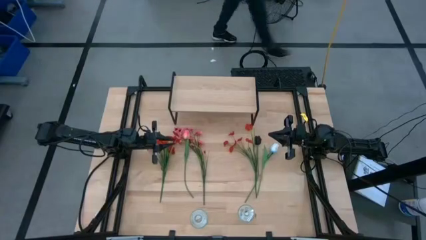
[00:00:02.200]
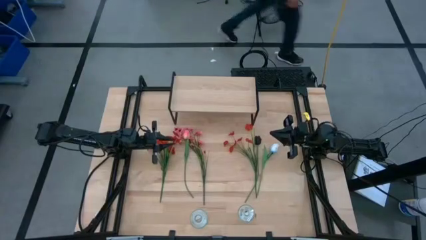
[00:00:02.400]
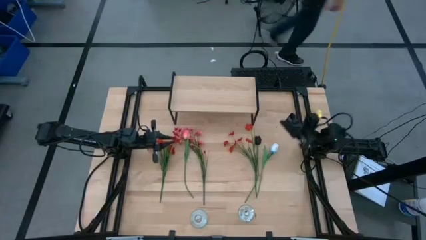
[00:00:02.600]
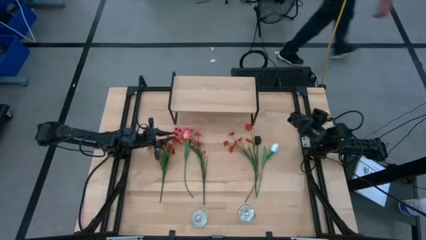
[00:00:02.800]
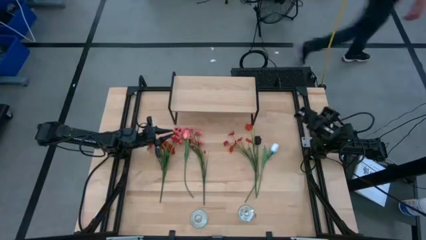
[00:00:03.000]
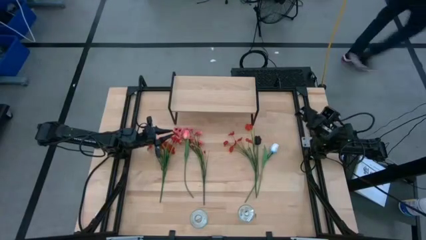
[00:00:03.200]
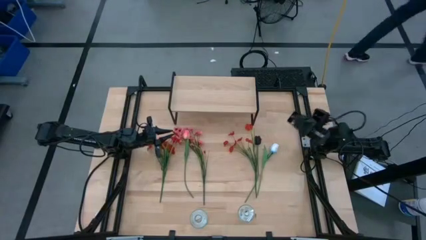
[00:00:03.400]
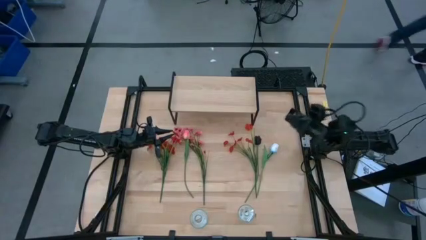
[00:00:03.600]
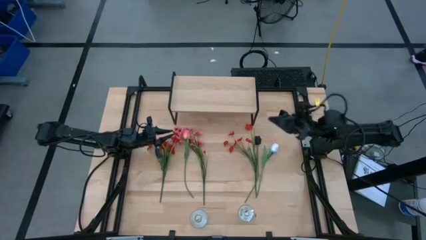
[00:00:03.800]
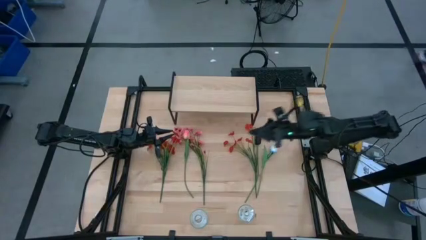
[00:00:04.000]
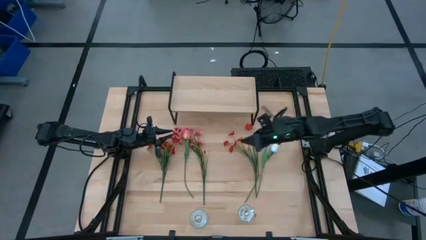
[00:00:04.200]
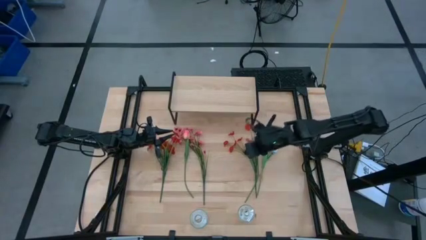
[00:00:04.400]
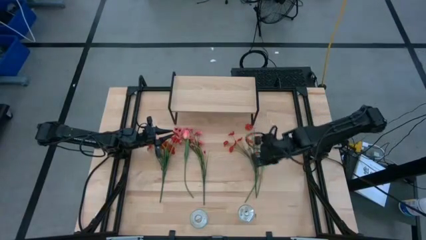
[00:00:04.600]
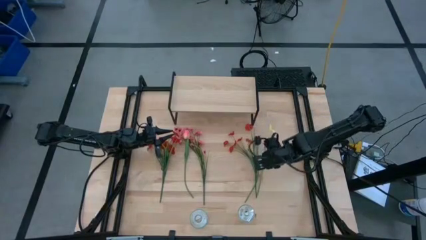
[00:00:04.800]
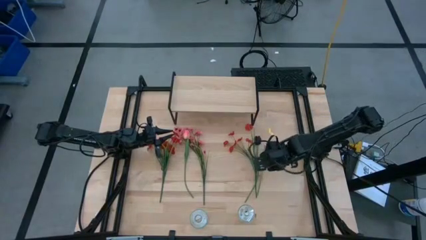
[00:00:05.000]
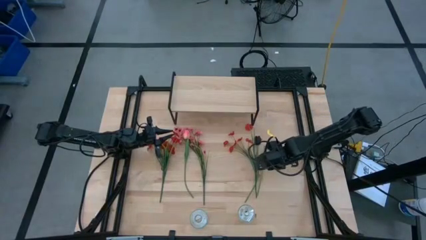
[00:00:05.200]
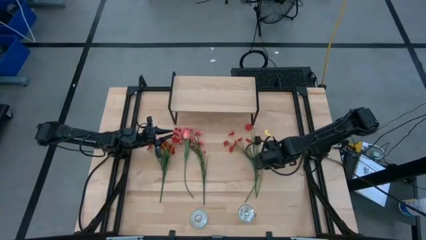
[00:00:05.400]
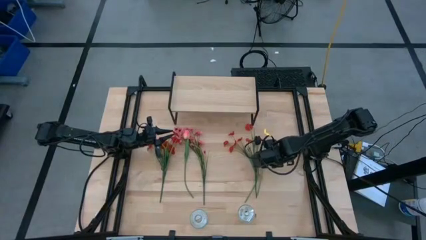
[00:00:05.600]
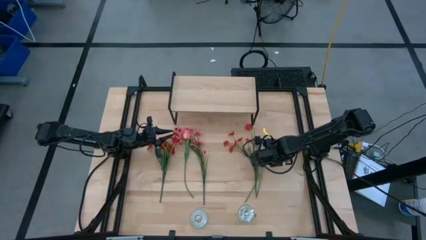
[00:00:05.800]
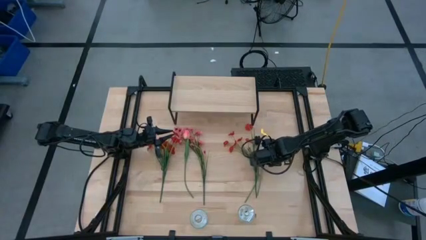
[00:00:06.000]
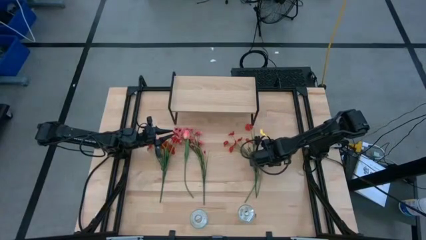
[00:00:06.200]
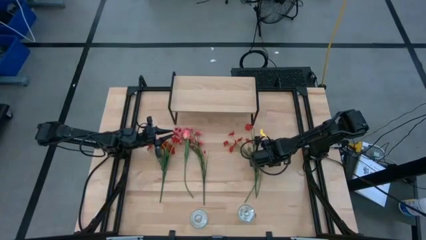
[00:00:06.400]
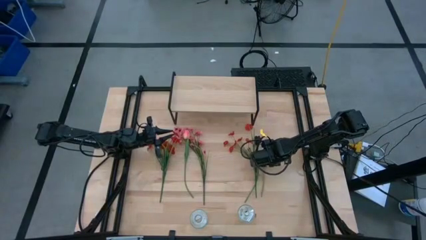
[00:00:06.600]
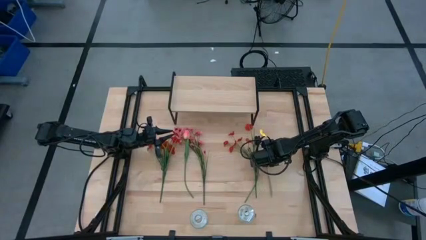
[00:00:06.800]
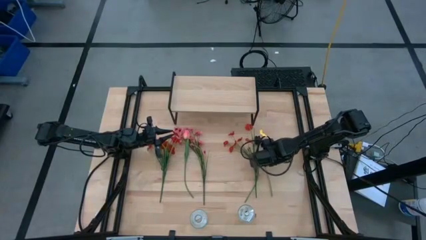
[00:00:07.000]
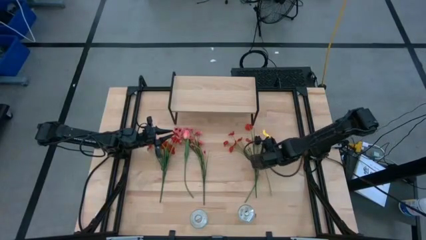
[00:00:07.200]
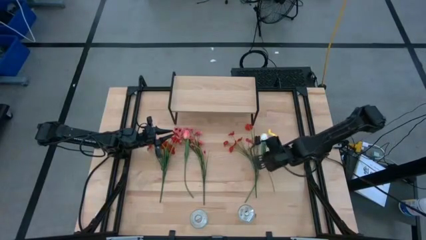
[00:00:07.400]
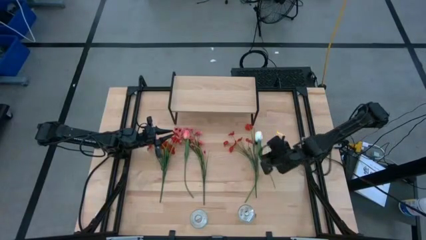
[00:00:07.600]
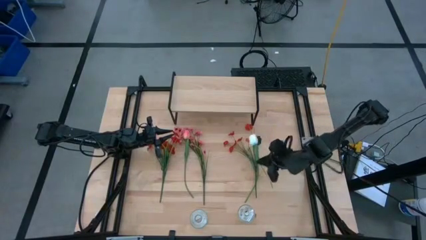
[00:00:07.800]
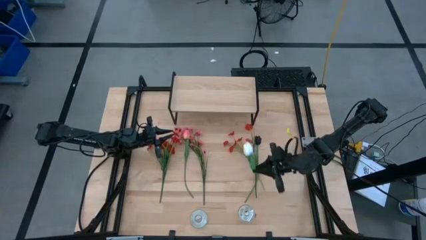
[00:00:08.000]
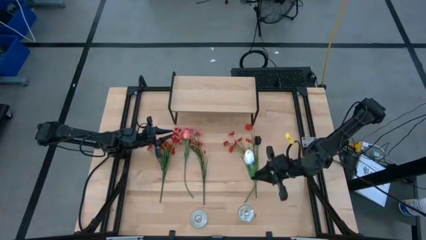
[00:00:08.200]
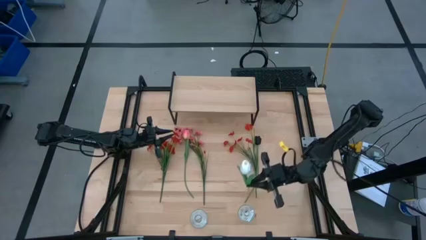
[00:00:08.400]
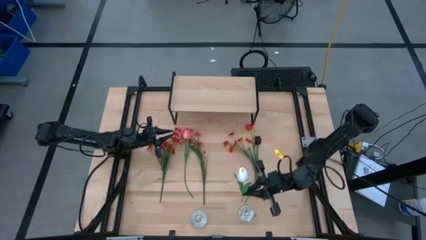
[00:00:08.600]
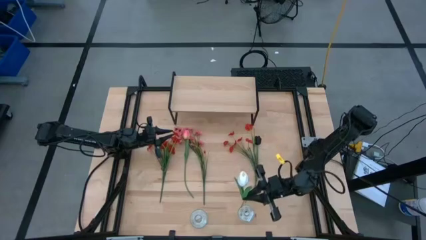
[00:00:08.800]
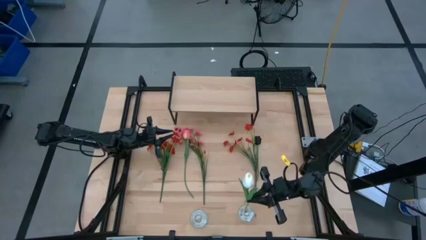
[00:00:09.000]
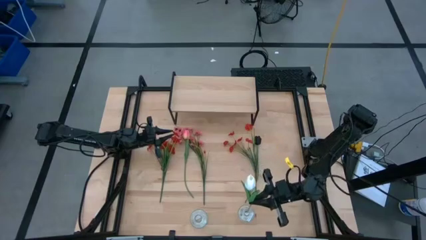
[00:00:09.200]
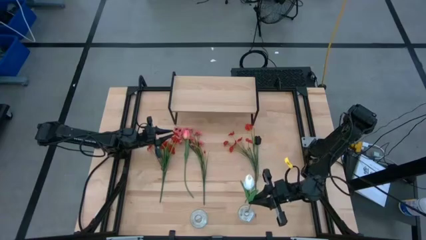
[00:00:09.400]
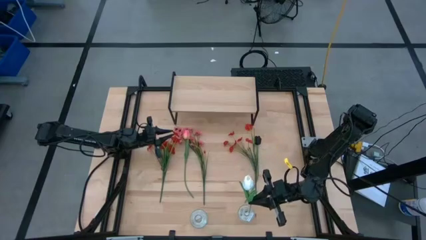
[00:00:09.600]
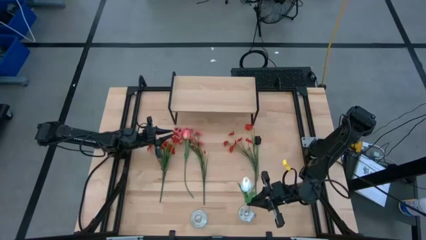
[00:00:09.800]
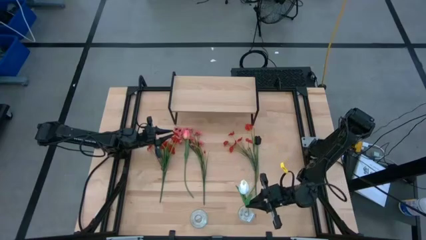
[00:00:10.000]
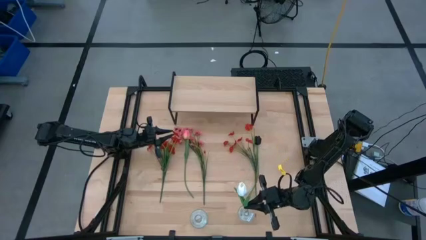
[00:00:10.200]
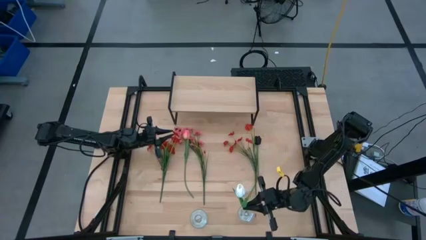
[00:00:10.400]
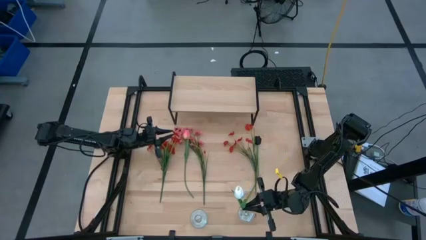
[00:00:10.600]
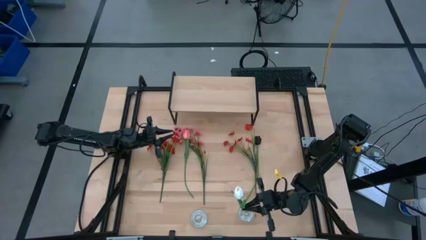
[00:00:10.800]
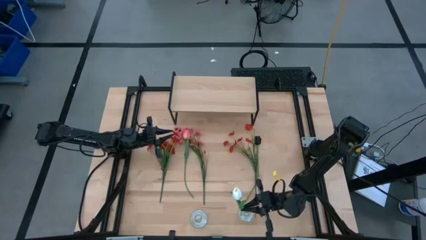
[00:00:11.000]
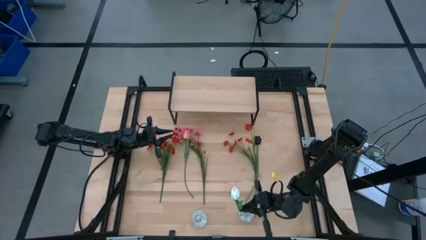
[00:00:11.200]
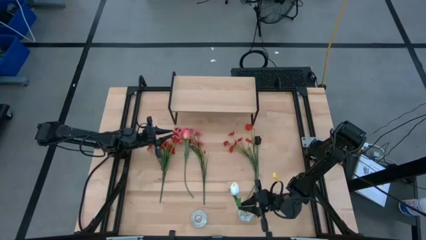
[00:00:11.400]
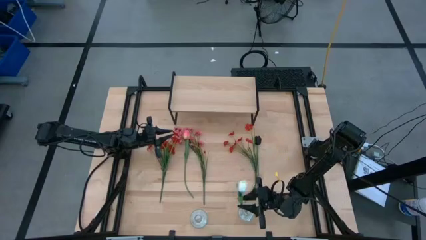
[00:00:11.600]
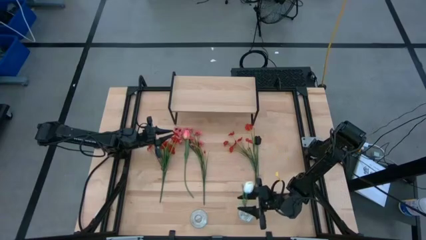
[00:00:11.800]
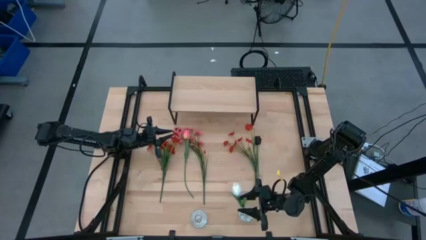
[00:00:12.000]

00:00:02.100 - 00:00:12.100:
Task: Pick and place flowers into a vace then onto a shelf
Put the white flower into the right transparent vase

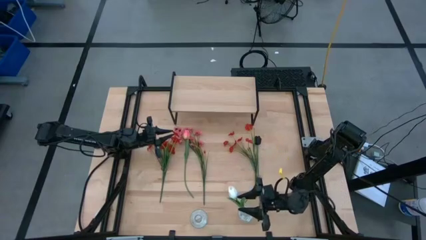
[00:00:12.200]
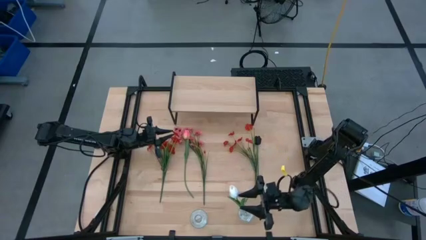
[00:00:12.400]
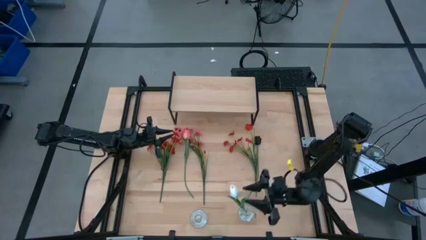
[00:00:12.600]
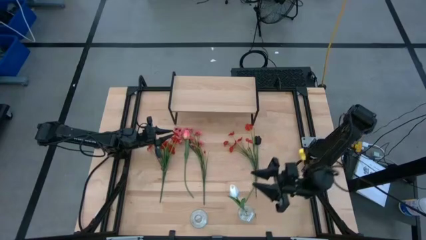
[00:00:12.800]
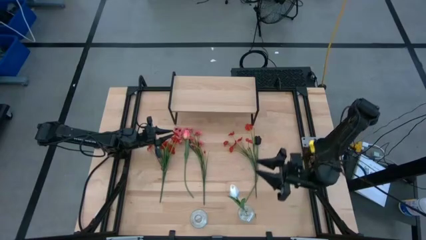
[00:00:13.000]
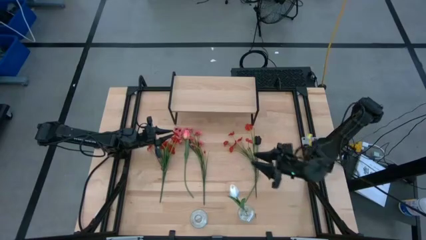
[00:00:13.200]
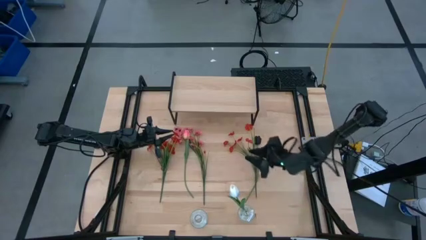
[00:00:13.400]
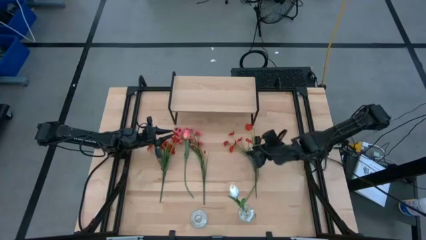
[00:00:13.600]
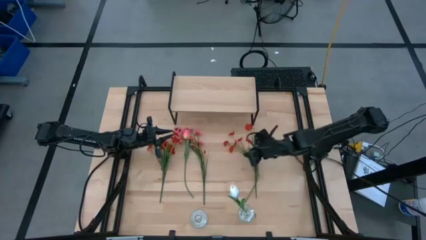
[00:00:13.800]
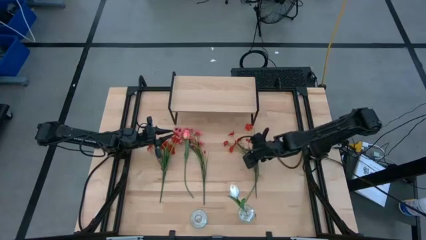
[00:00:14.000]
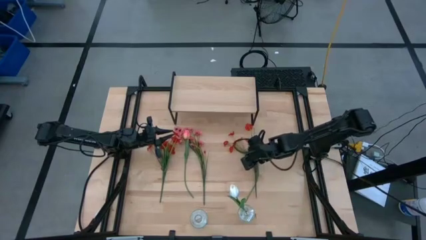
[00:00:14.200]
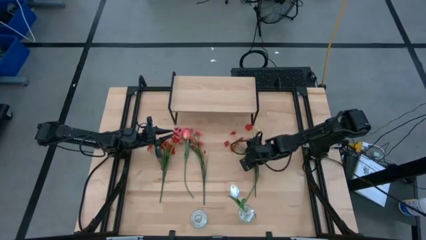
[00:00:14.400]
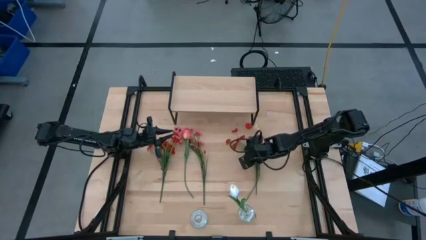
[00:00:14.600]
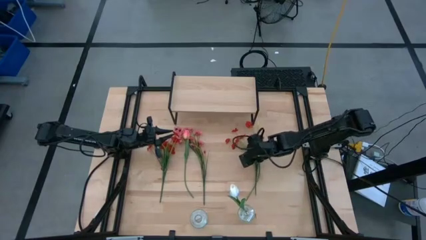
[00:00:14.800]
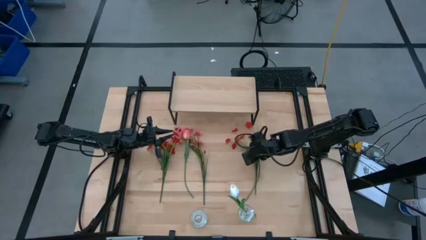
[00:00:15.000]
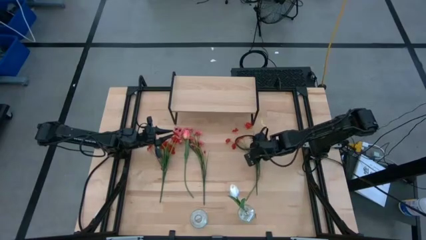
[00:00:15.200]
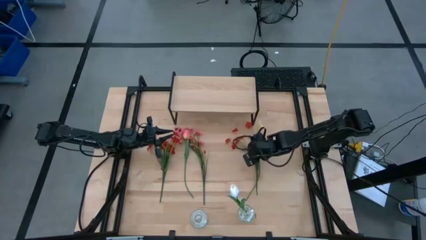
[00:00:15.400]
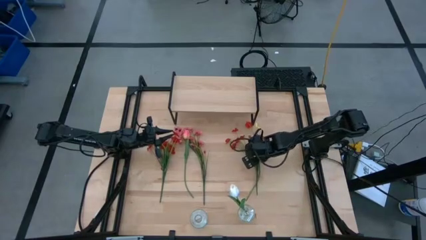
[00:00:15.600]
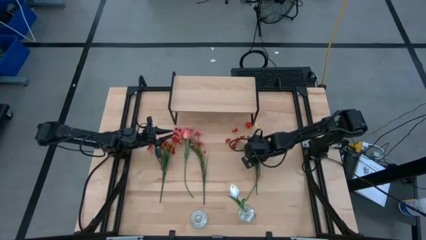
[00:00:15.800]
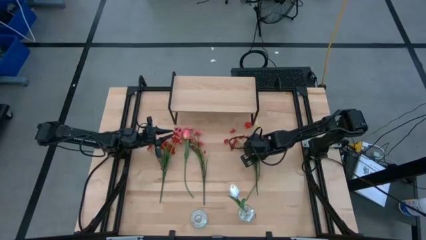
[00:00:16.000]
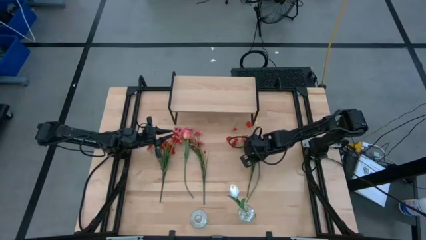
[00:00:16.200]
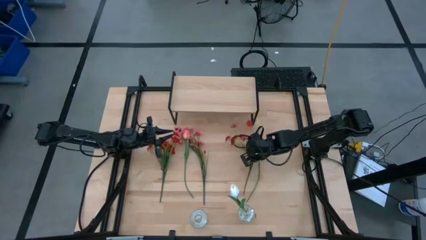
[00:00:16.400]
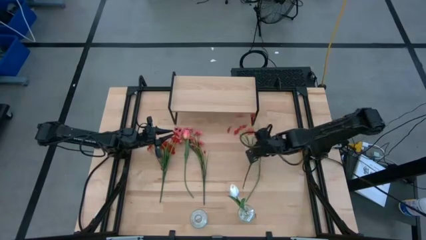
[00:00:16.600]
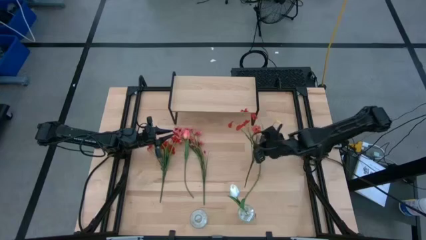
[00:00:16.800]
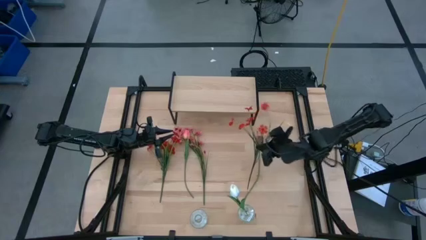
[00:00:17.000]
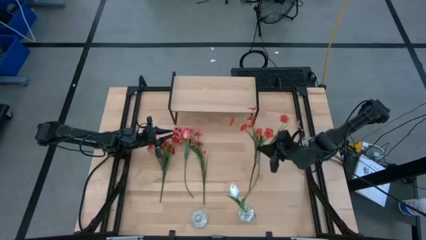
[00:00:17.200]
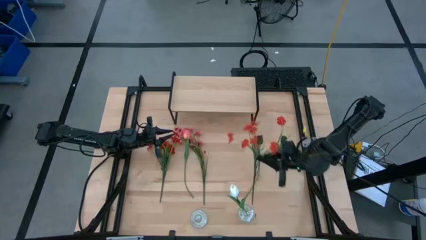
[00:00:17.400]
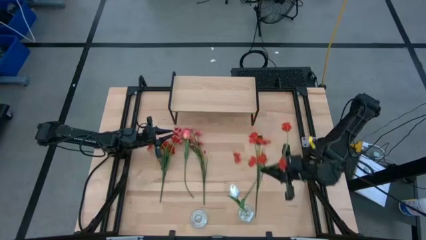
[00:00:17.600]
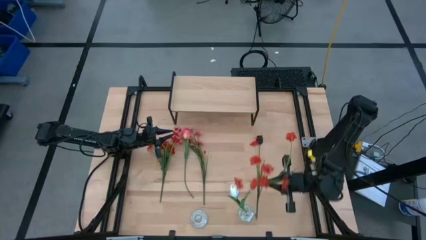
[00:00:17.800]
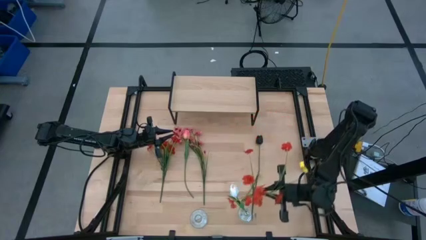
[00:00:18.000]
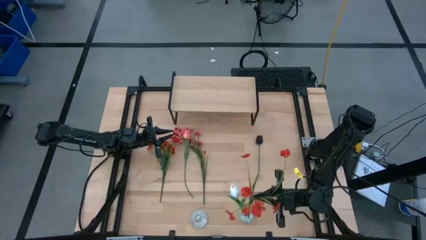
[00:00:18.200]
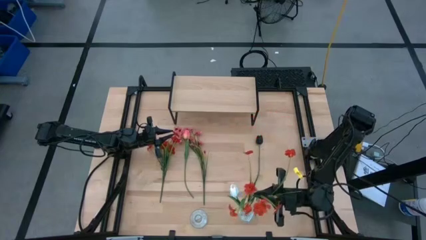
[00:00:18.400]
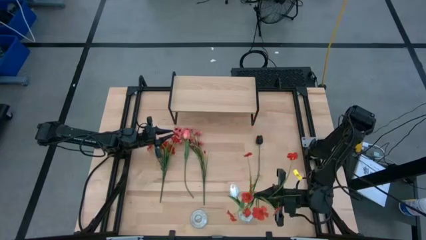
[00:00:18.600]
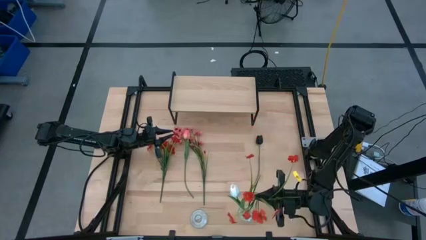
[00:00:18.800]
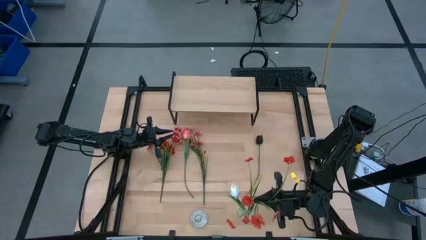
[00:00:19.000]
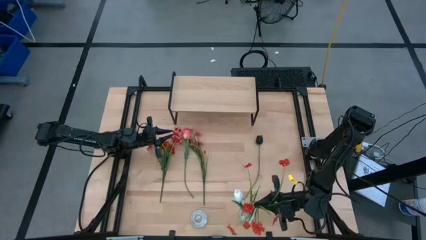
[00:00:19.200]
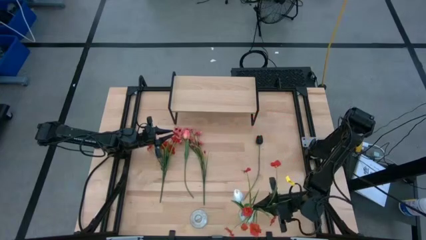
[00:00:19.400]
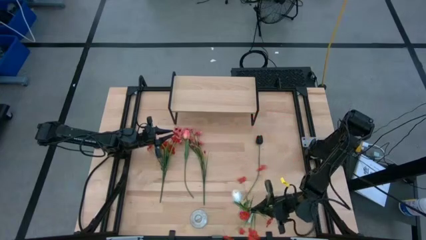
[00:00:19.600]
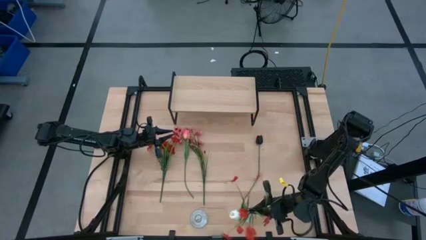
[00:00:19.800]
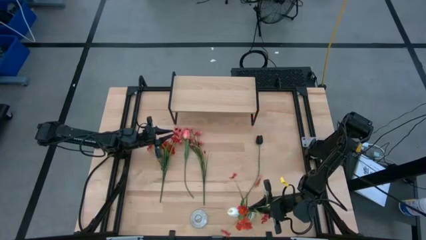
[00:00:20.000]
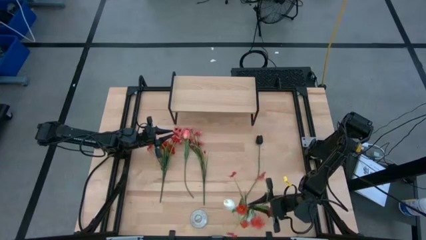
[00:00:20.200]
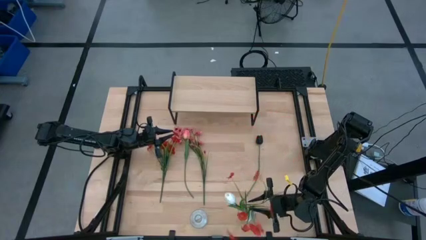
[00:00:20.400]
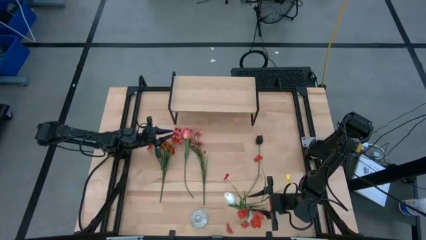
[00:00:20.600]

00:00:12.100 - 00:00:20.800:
Put the right orange flowers into the right transparent vase
